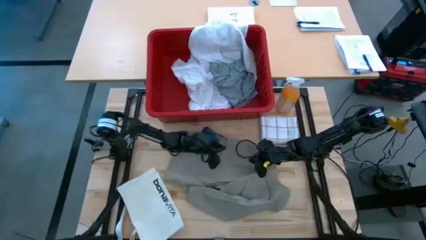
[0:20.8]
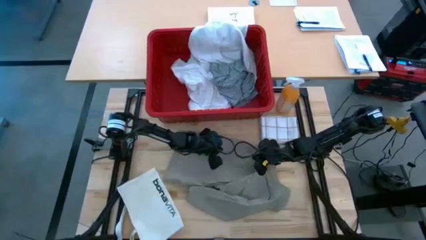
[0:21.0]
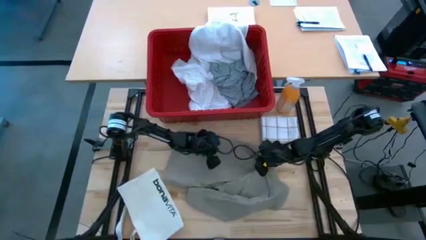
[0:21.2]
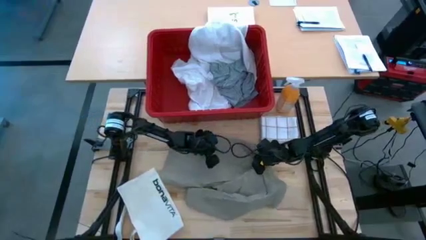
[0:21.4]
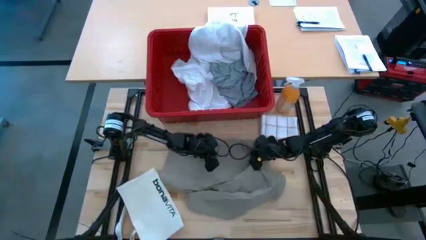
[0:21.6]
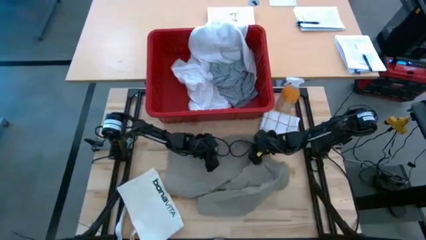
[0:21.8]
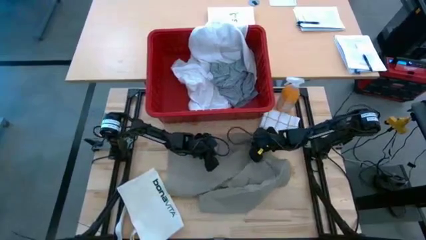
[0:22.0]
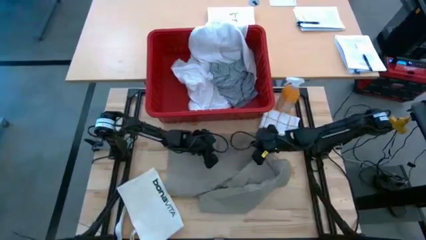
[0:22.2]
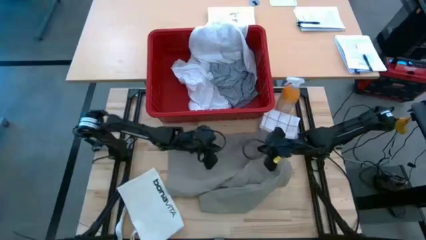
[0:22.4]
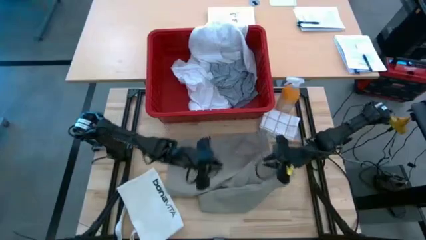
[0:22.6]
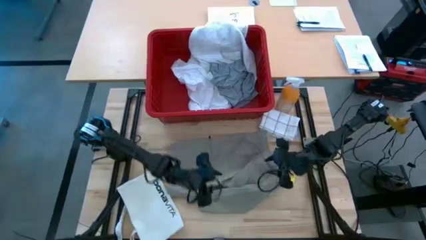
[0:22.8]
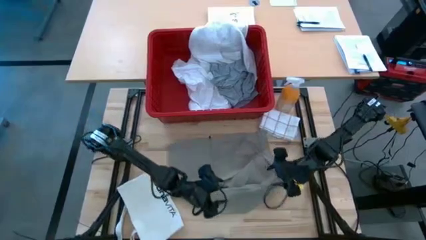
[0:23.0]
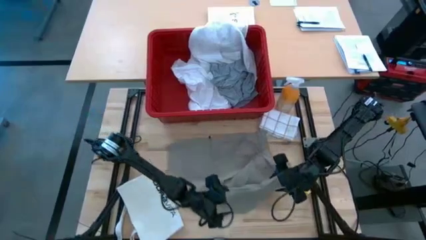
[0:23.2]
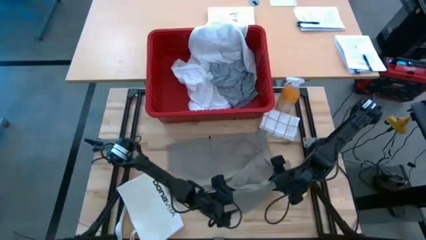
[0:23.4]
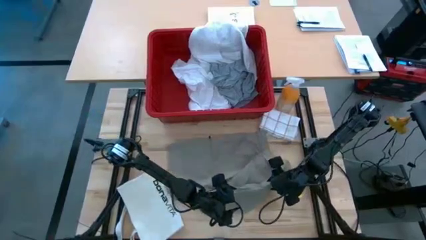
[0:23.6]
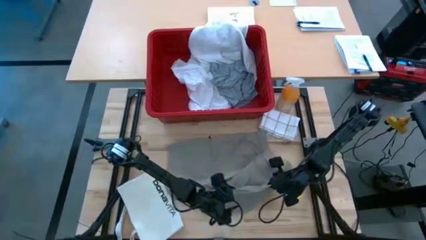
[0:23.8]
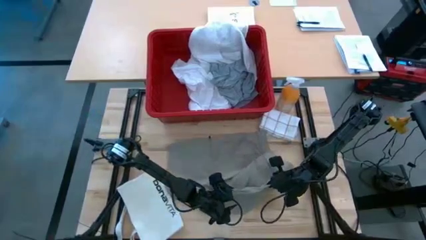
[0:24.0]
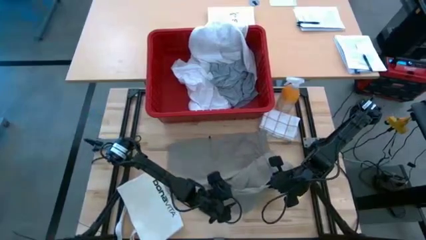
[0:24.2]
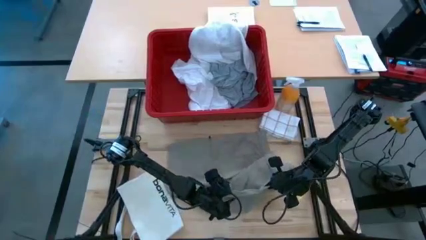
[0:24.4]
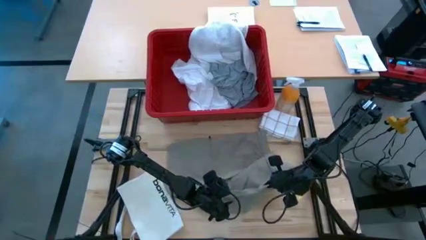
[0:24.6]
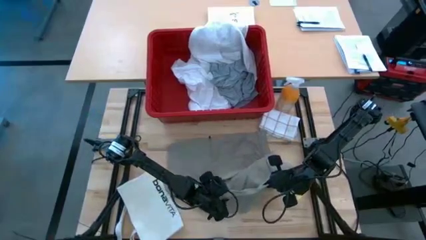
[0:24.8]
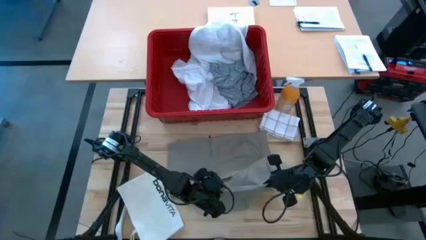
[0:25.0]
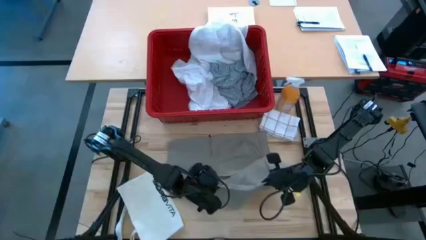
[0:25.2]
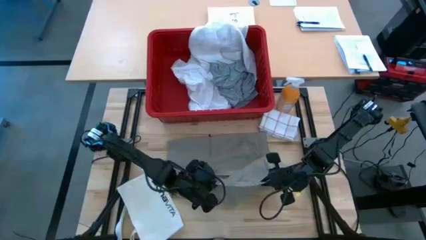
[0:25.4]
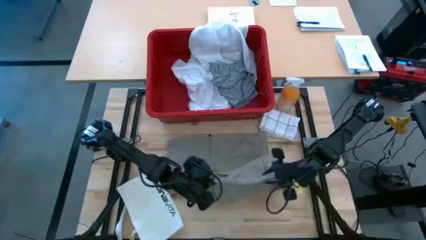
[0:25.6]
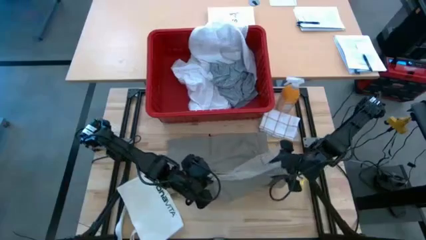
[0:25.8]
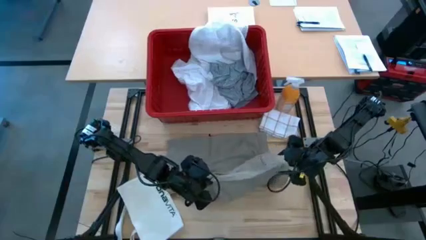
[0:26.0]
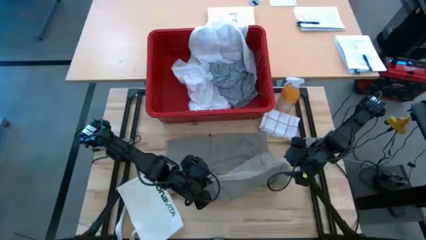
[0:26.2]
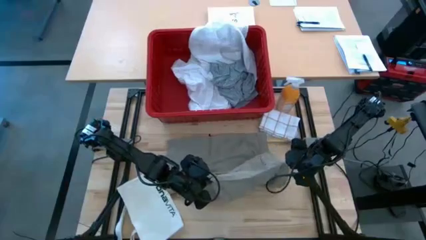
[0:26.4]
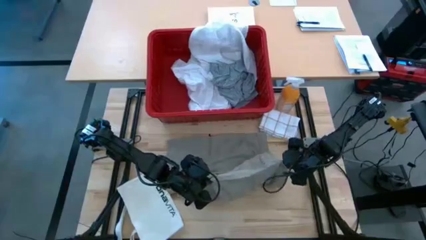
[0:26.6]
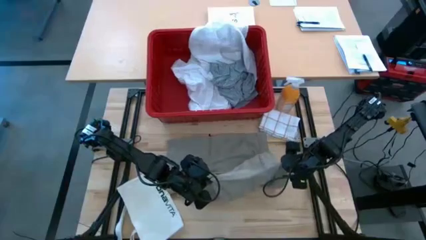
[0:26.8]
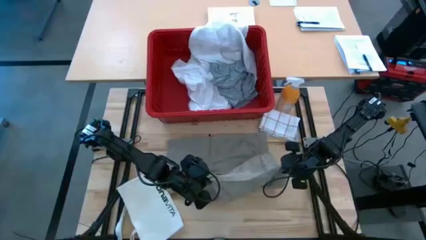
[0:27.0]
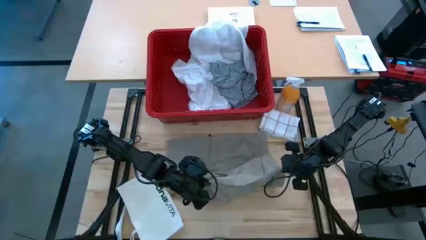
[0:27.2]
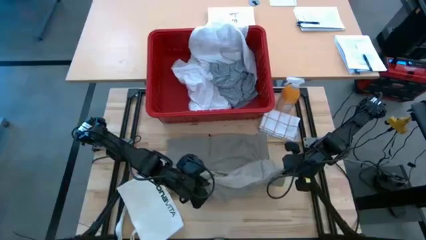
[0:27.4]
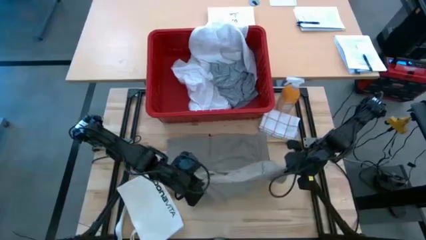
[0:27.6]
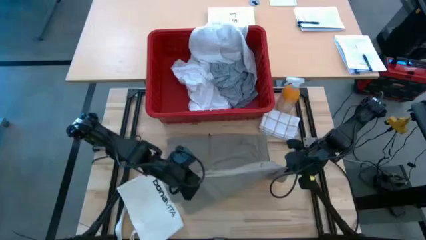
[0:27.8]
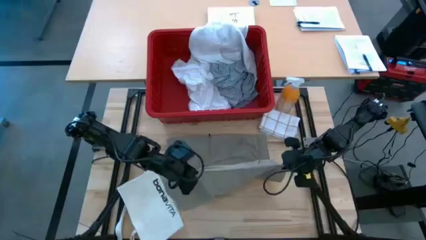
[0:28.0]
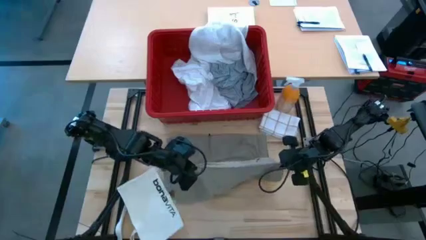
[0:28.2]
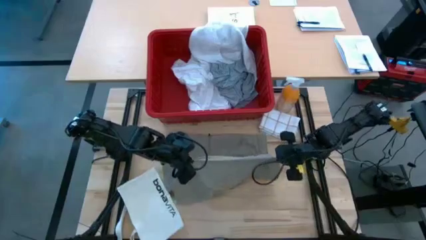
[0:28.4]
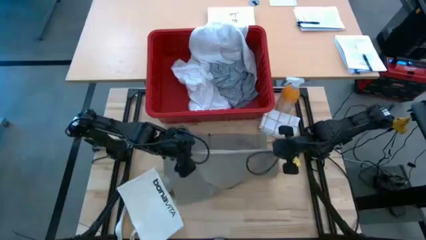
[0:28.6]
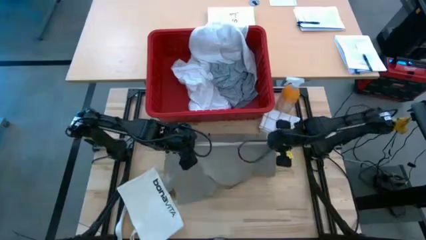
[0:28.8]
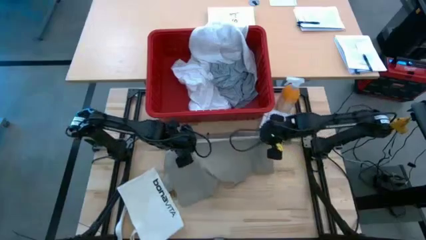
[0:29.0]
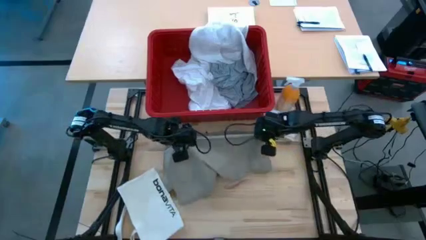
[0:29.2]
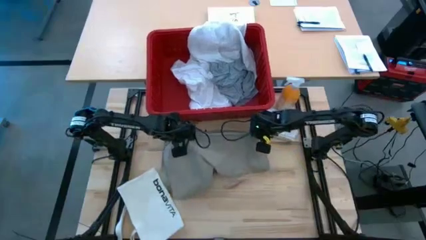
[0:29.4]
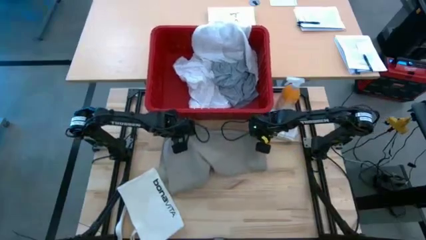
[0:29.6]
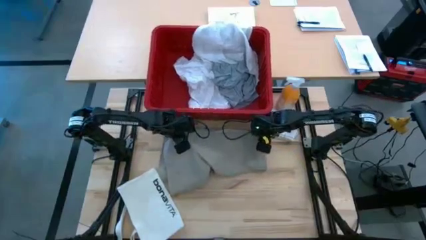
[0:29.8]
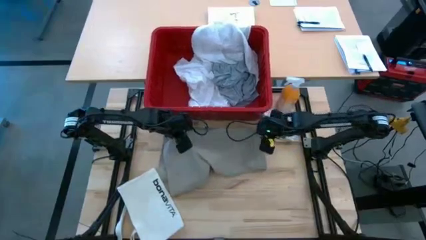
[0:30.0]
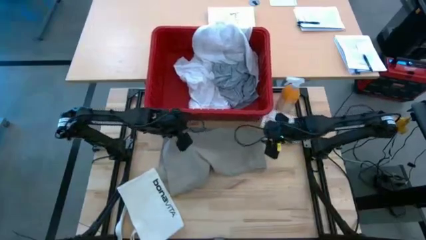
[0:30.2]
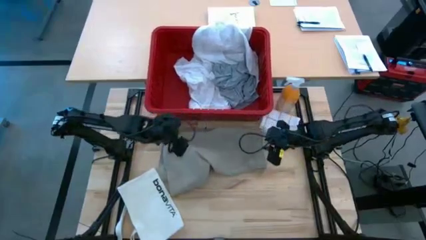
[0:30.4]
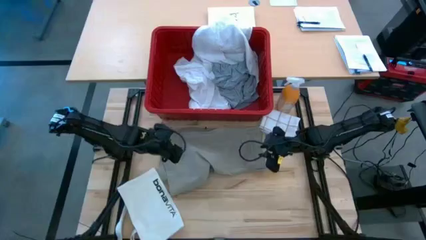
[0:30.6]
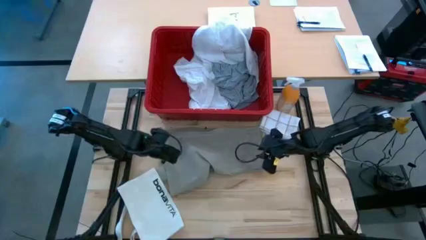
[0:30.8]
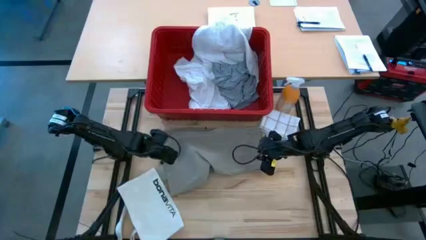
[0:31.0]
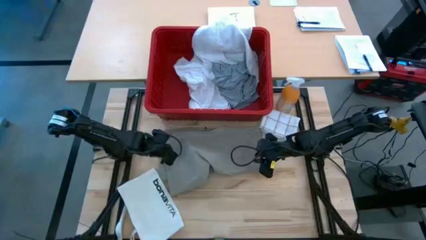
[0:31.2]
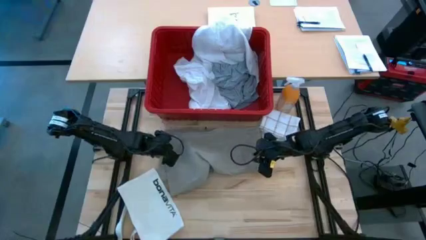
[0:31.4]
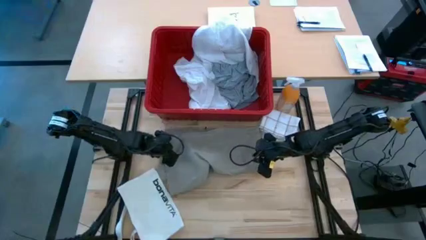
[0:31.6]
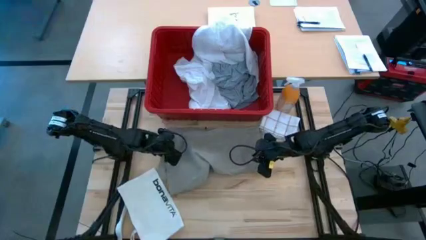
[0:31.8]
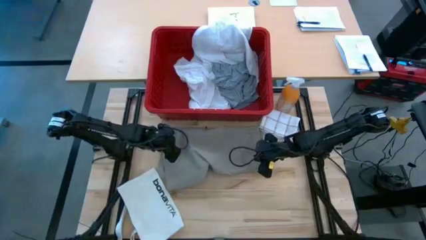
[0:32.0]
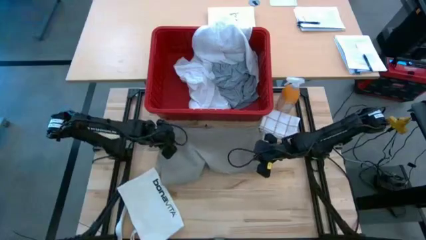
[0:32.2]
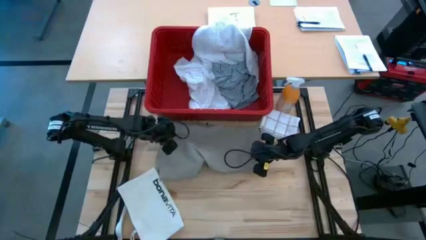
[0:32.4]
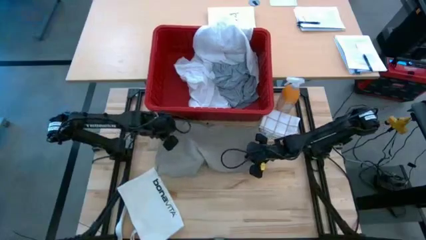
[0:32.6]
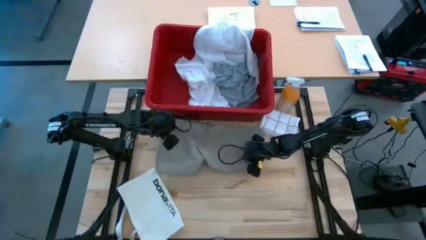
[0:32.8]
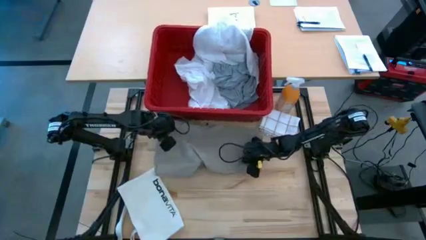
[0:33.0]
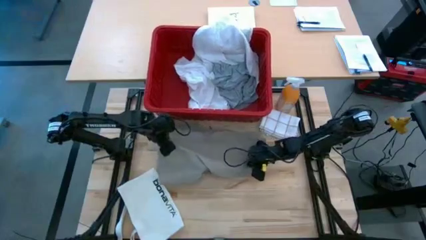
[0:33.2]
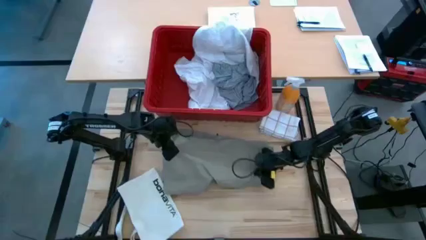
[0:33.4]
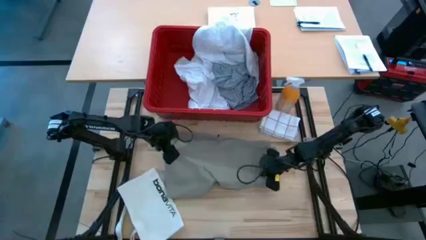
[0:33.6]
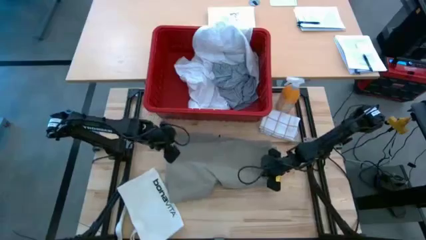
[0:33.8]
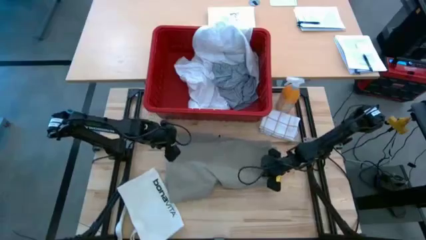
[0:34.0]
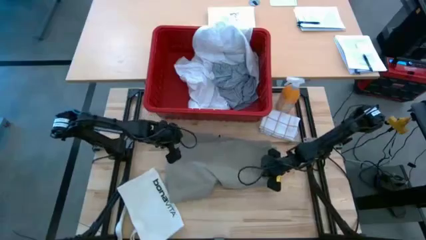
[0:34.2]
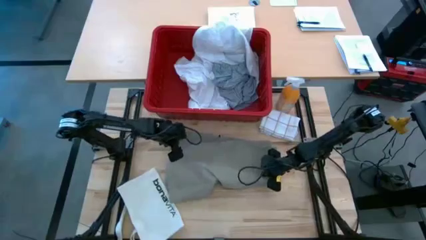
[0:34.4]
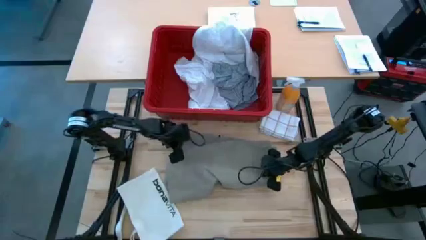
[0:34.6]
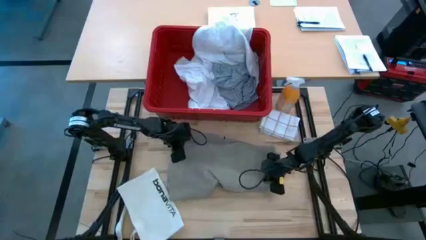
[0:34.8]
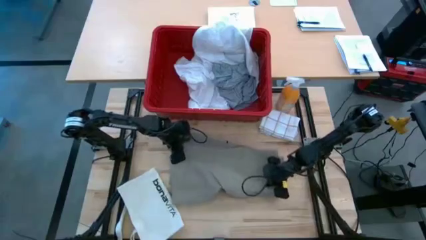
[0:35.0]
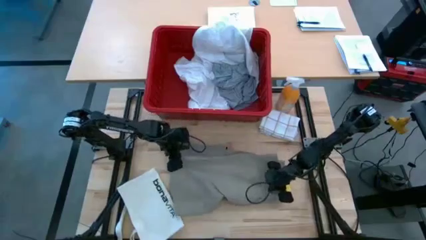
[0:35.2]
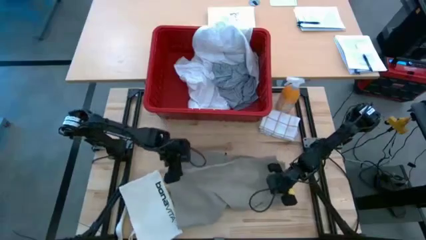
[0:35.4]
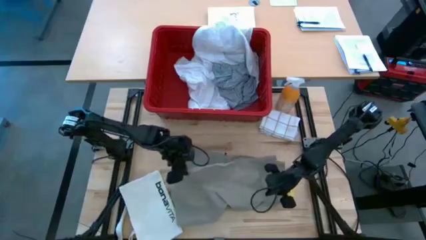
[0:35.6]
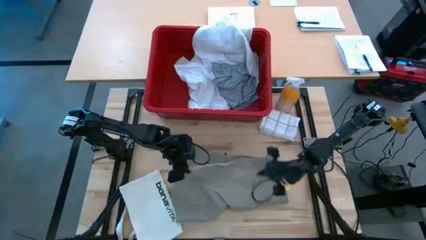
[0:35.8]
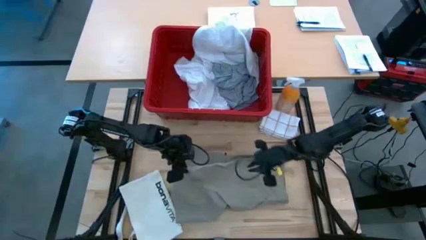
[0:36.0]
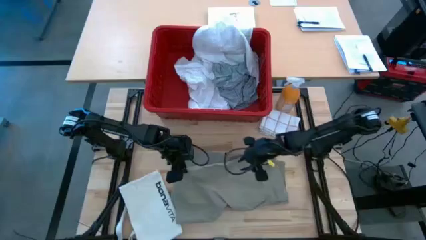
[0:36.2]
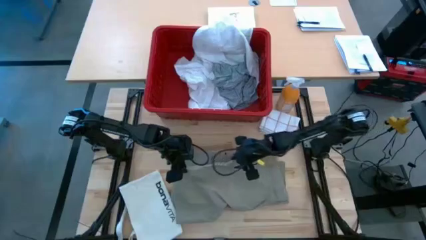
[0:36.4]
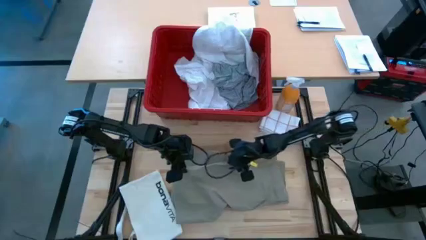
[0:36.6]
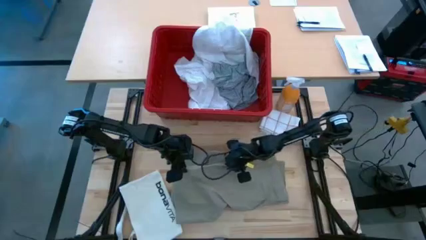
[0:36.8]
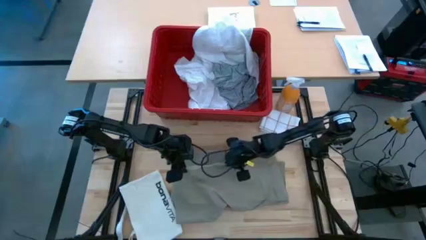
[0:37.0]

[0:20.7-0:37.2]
Task: Fold laundry
Fold the brown shorts
